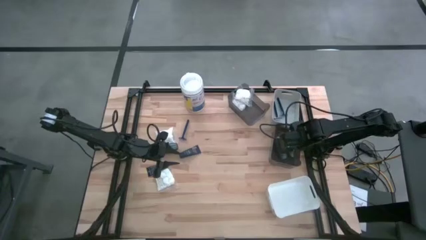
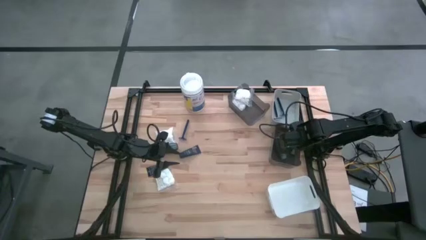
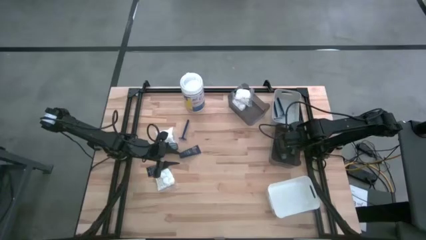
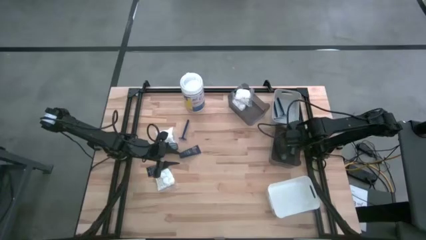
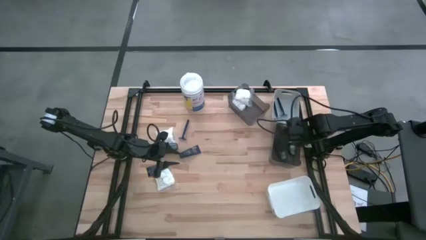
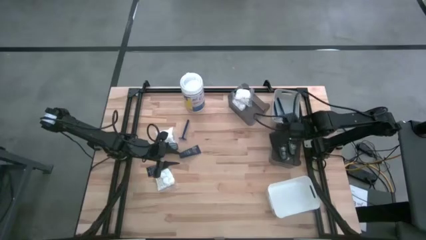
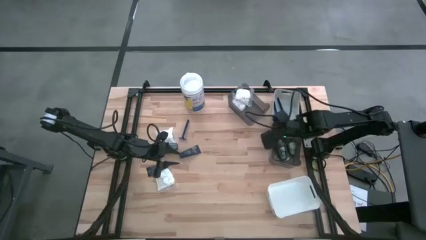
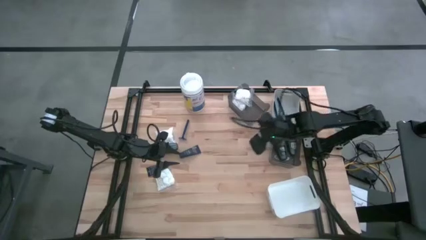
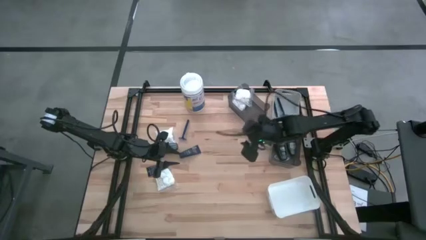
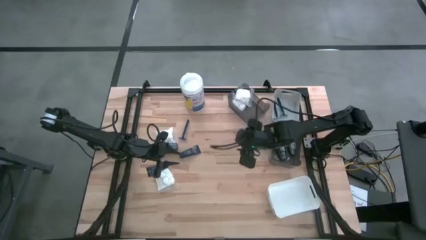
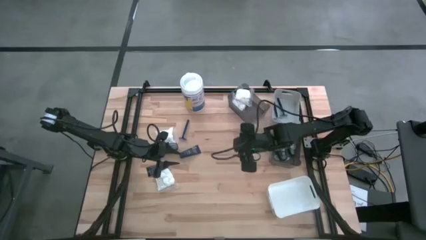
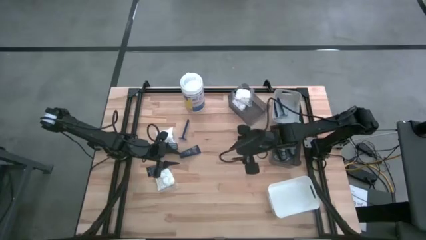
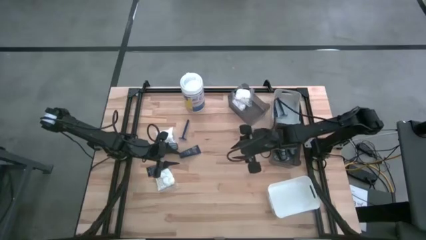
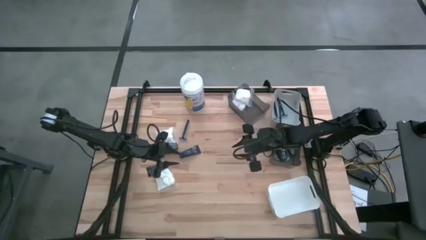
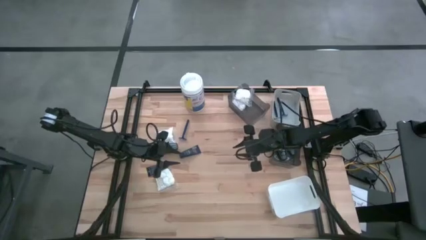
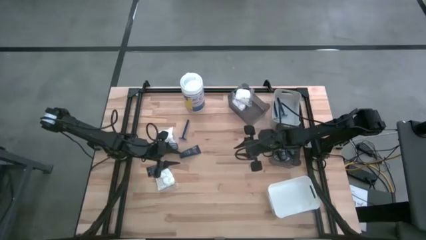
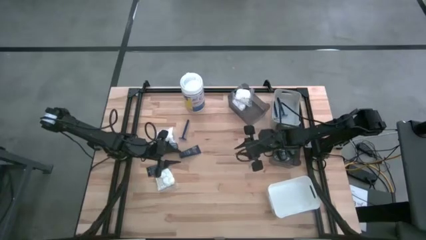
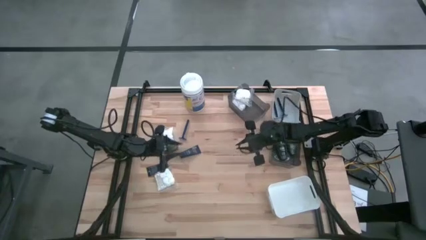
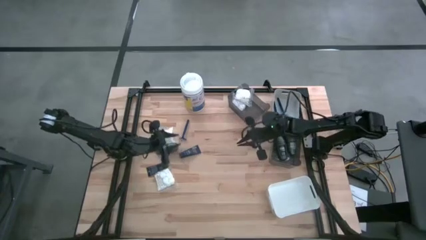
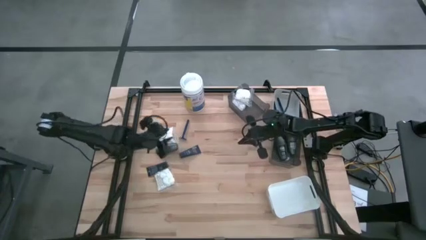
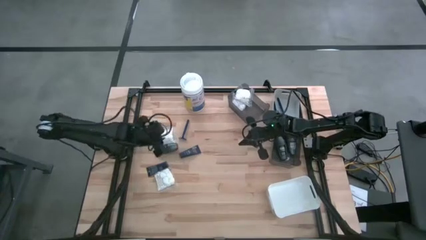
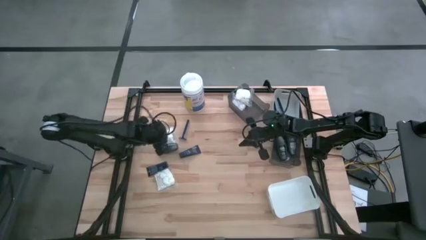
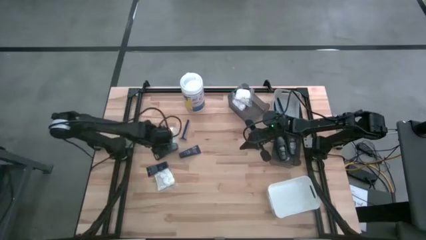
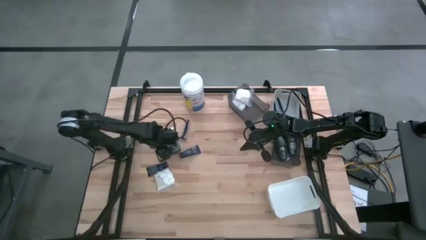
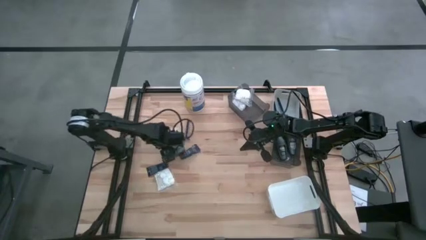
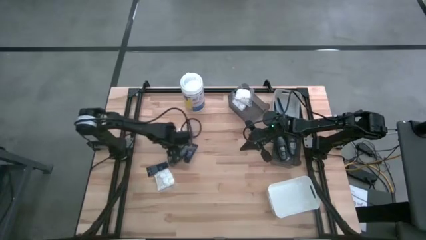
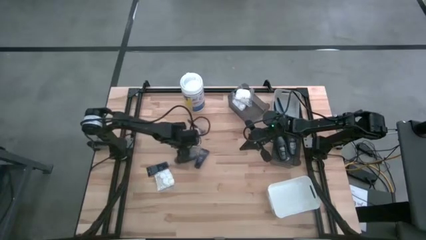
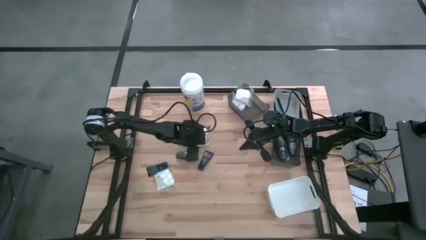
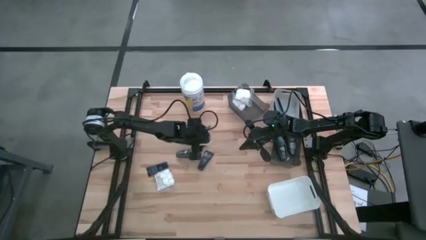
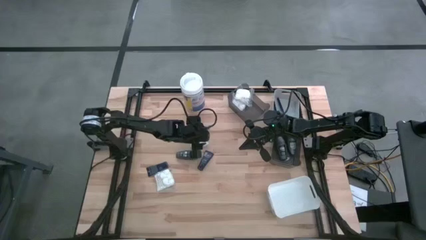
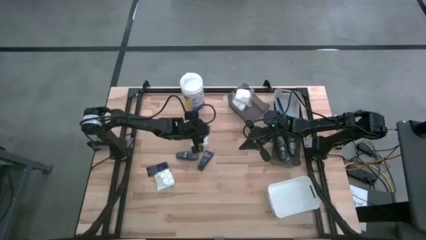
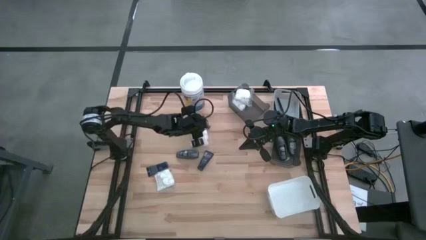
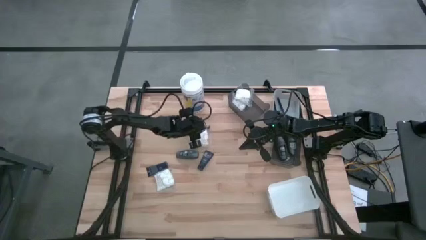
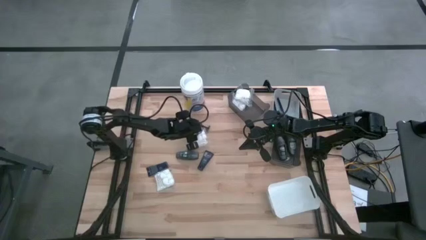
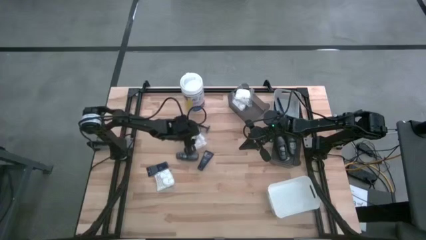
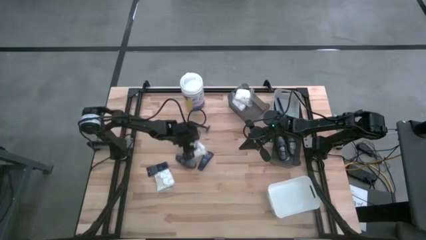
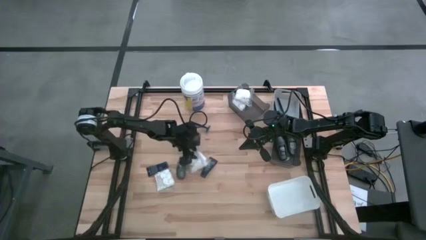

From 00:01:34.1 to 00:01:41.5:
Task: Pick & Place Travel size toiletries
Move the white cotton pack to the center of the table

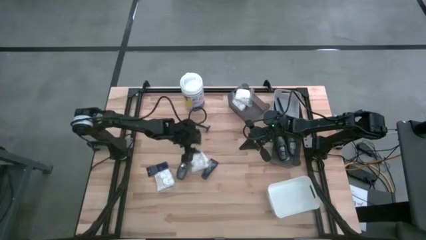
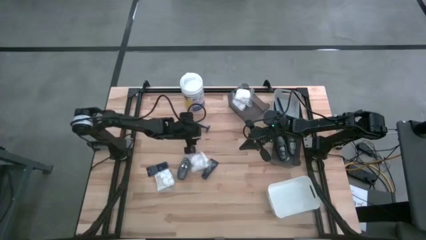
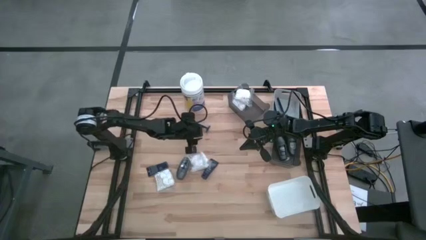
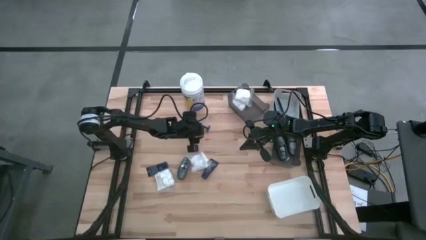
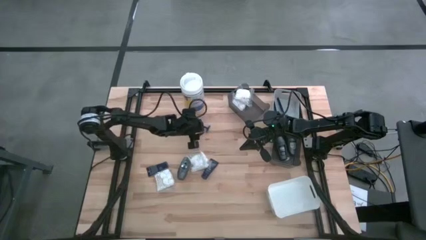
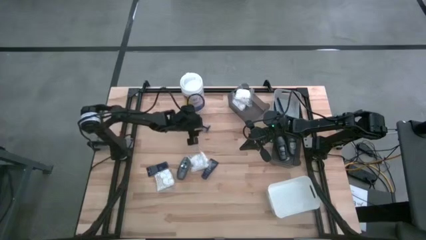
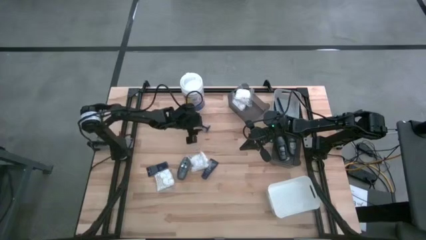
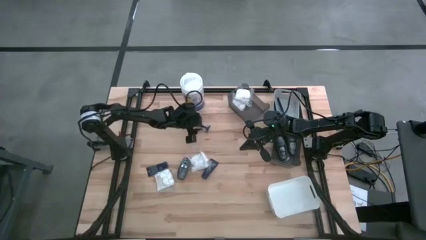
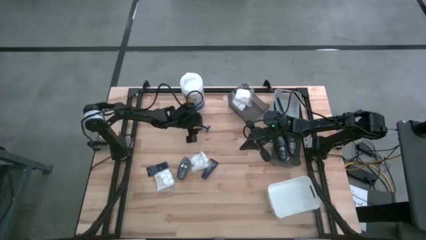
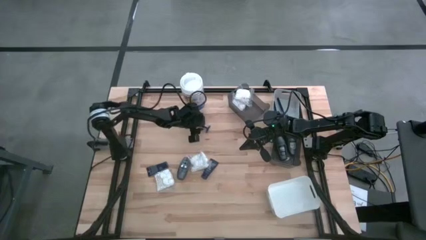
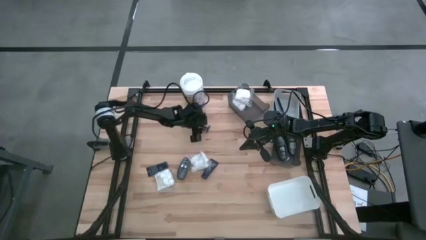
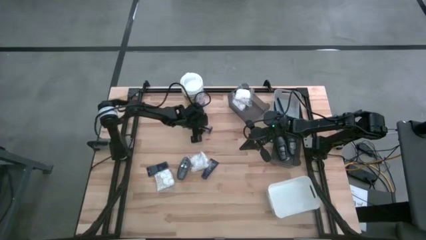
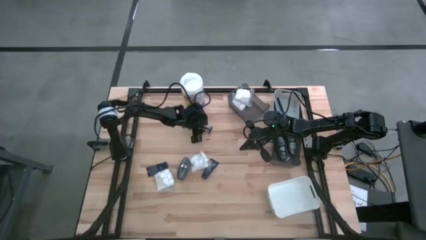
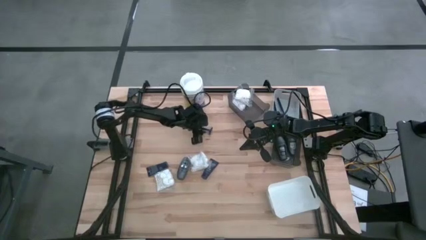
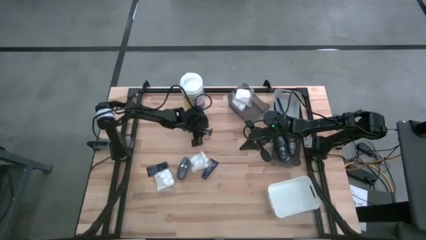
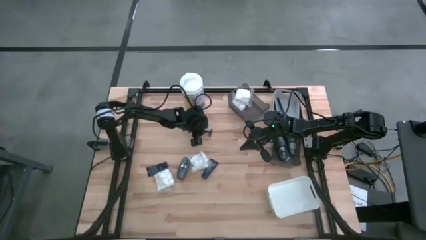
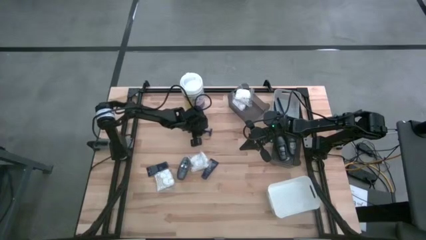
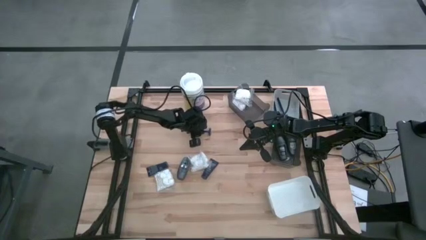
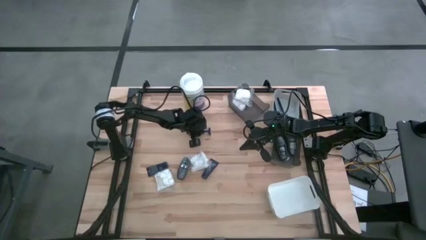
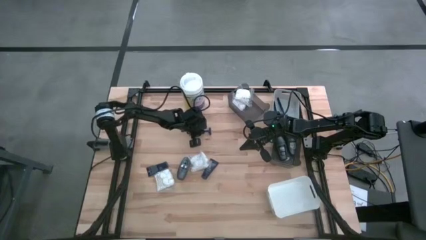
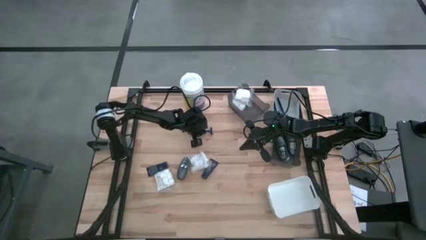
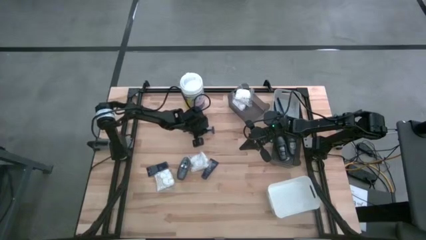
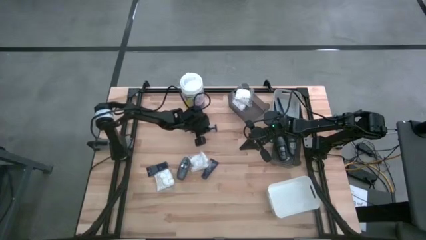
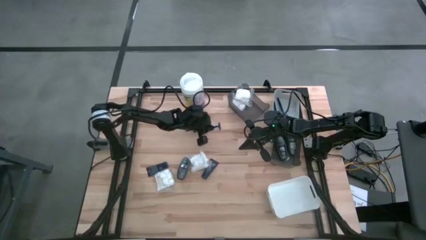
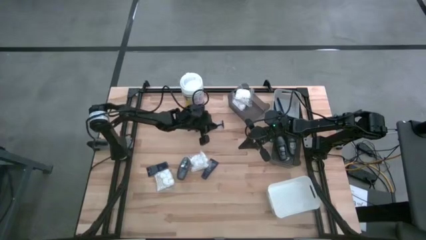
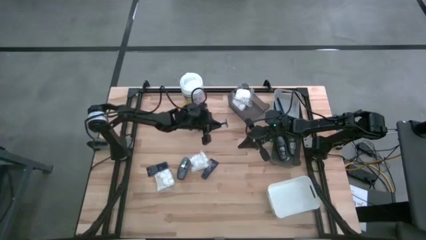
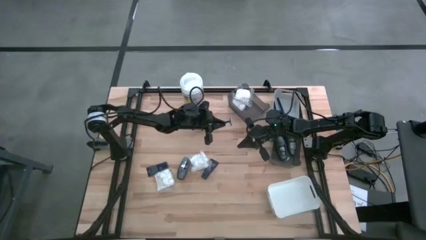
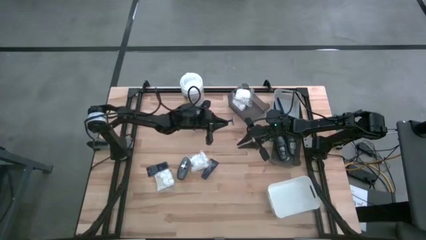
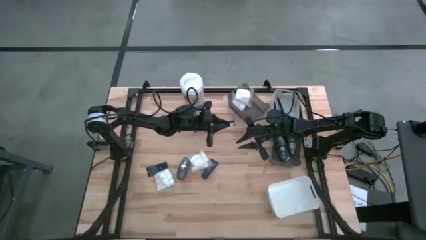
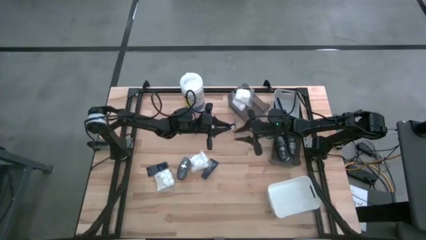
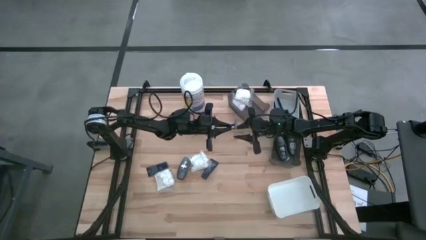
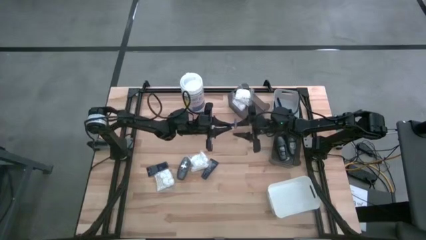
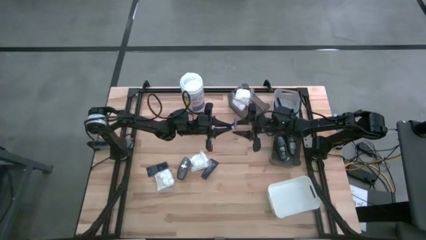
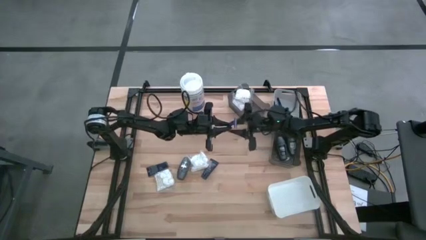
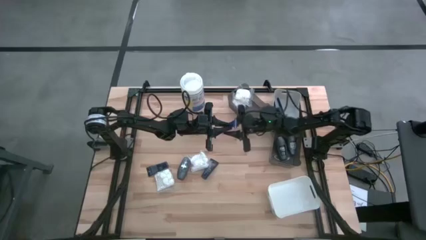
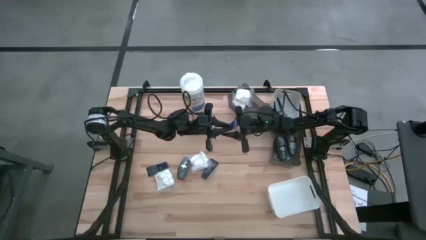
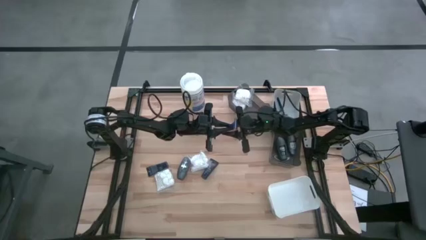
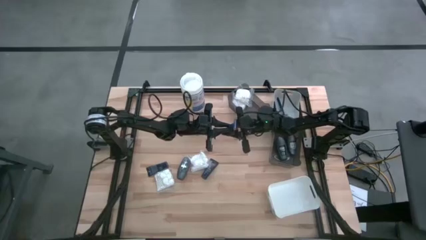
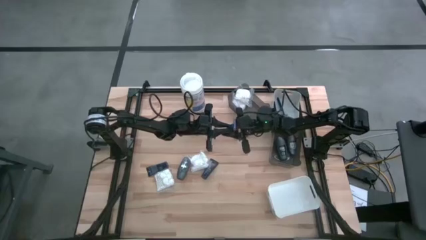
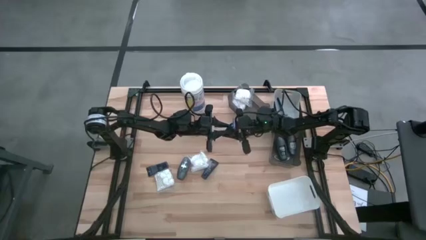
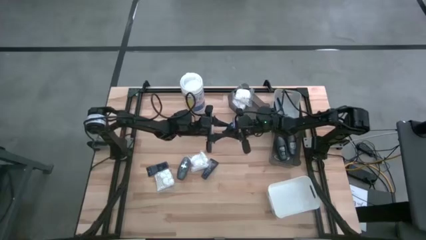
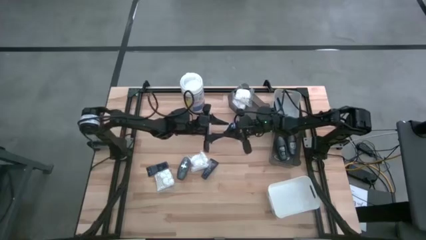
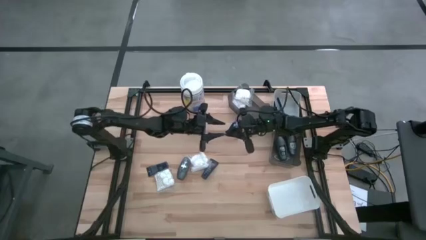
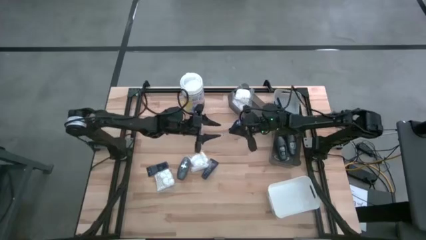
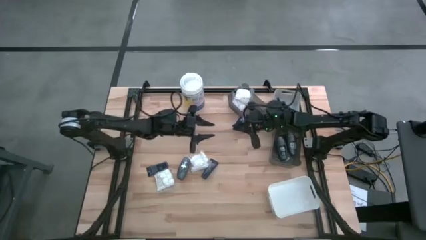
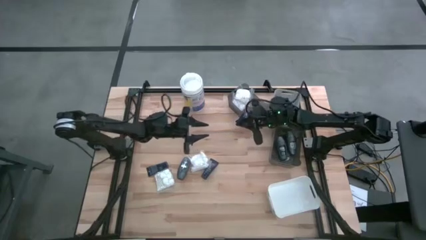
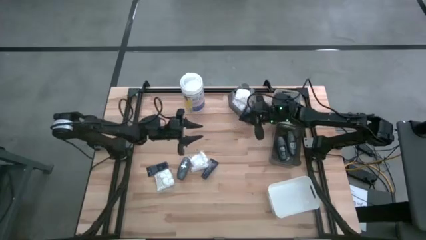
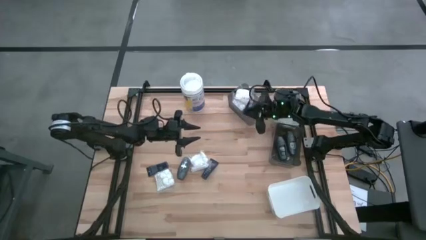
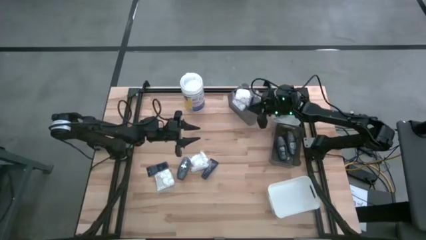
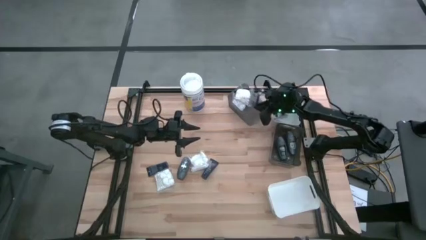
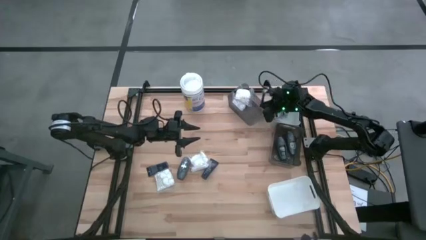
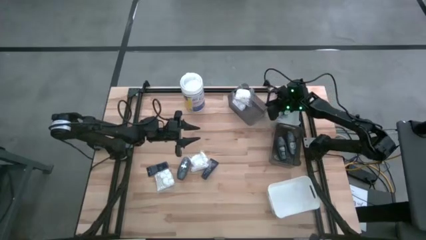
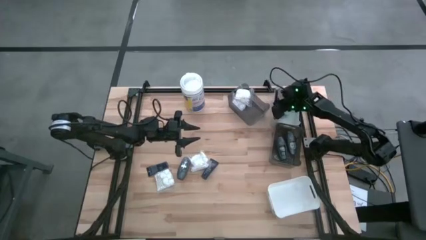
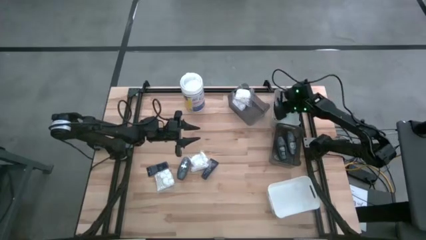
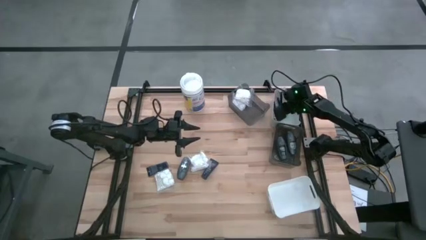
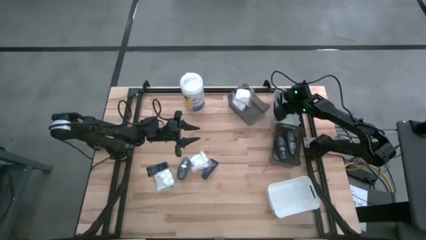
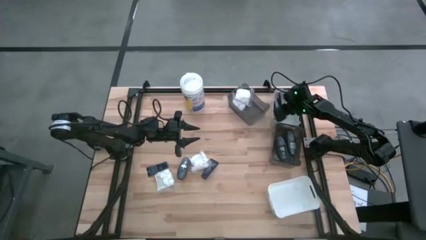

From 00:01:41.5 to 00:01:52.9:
Put the blue razor into the gray bin
